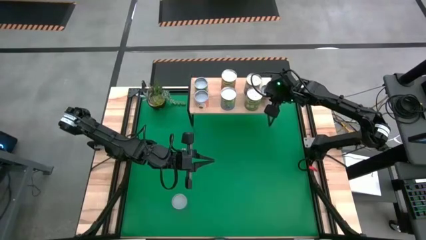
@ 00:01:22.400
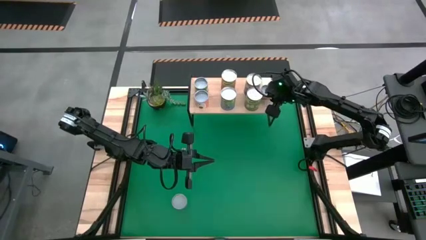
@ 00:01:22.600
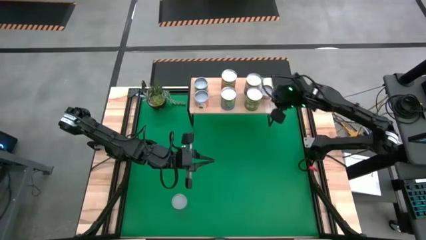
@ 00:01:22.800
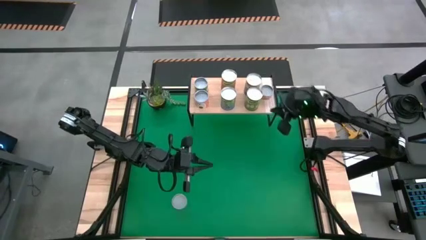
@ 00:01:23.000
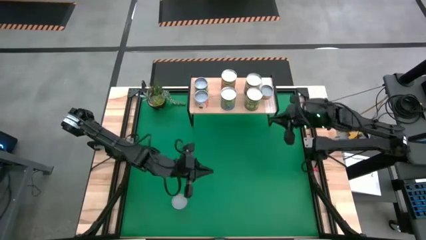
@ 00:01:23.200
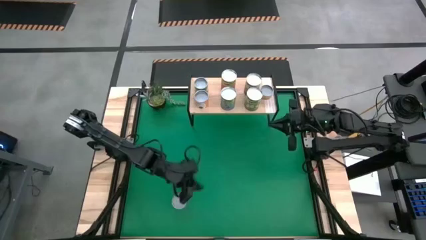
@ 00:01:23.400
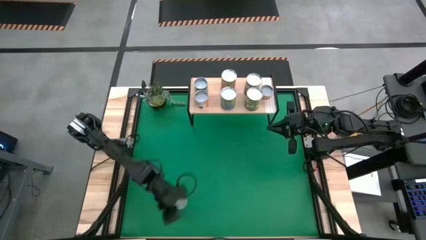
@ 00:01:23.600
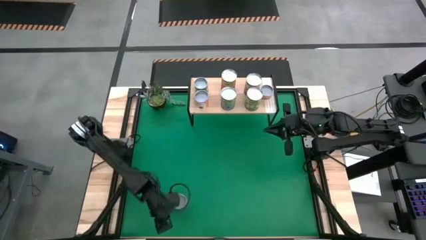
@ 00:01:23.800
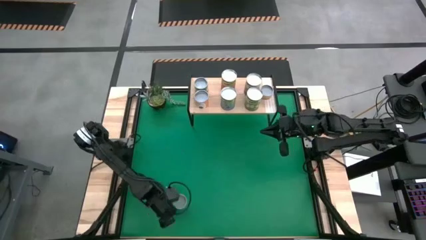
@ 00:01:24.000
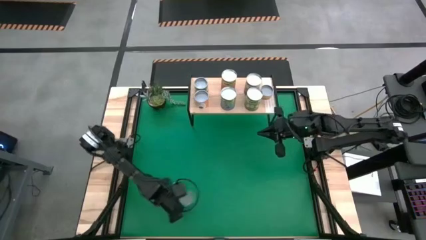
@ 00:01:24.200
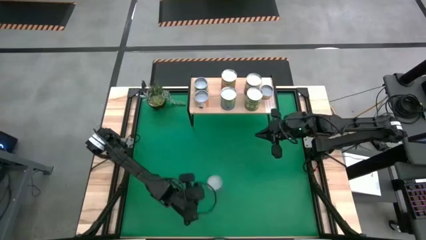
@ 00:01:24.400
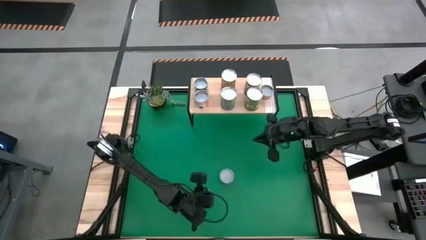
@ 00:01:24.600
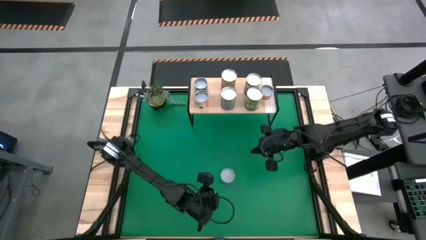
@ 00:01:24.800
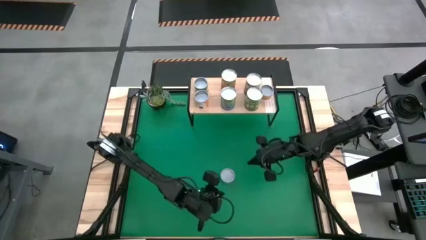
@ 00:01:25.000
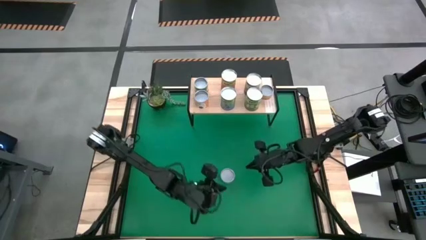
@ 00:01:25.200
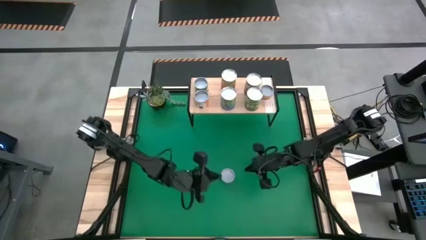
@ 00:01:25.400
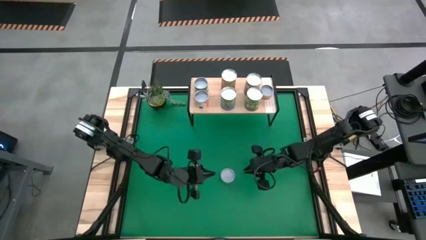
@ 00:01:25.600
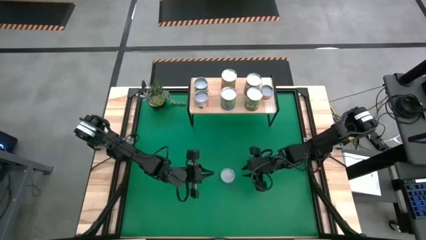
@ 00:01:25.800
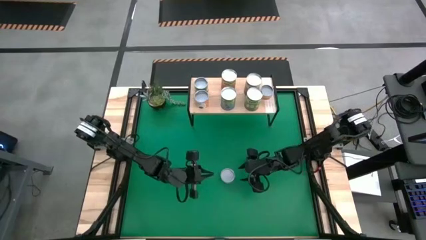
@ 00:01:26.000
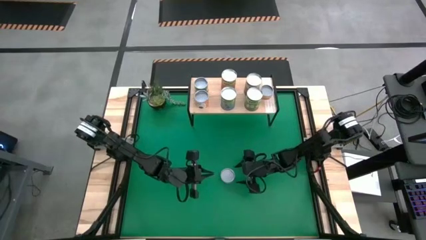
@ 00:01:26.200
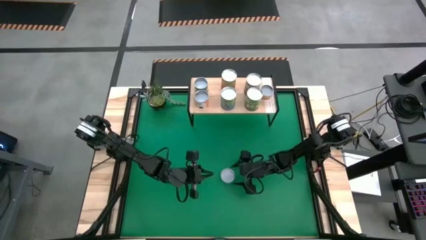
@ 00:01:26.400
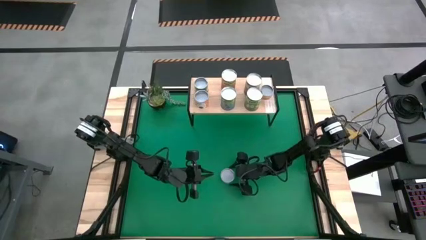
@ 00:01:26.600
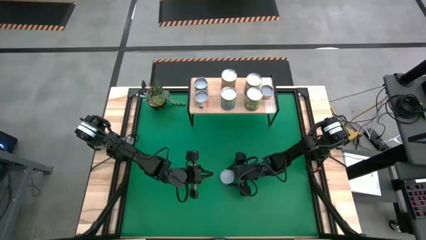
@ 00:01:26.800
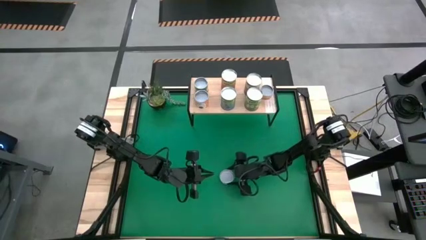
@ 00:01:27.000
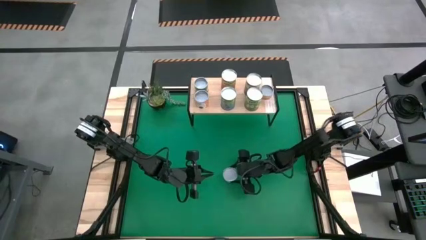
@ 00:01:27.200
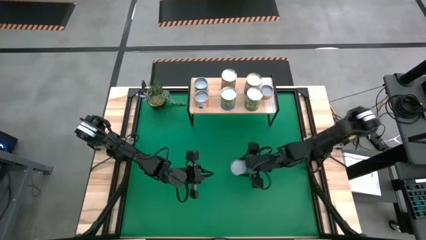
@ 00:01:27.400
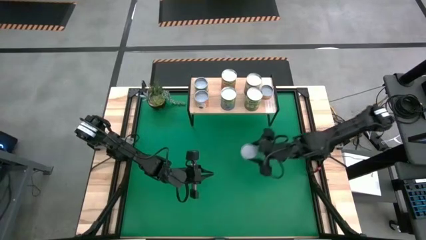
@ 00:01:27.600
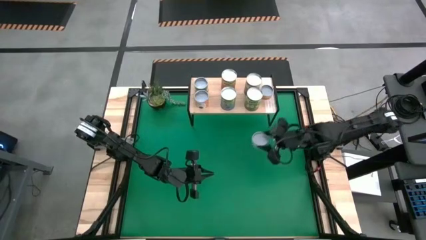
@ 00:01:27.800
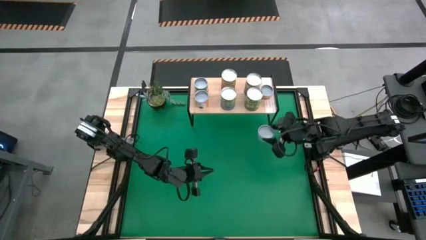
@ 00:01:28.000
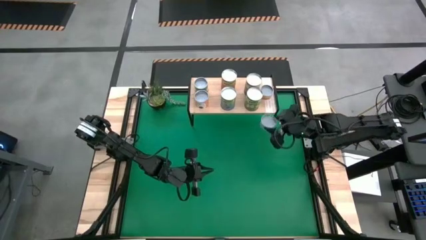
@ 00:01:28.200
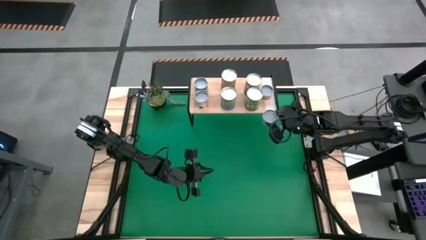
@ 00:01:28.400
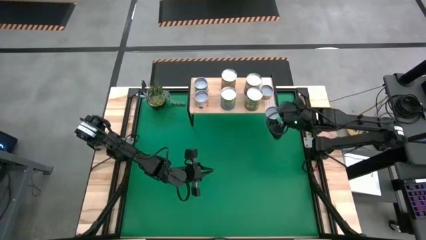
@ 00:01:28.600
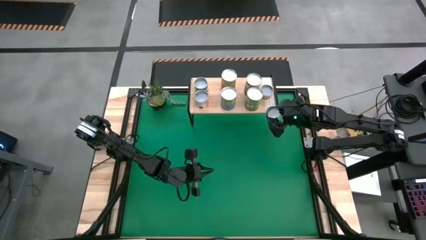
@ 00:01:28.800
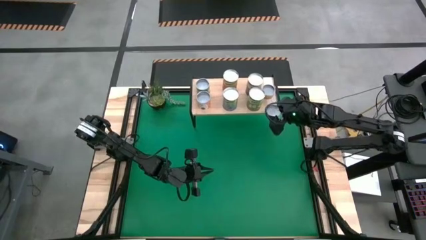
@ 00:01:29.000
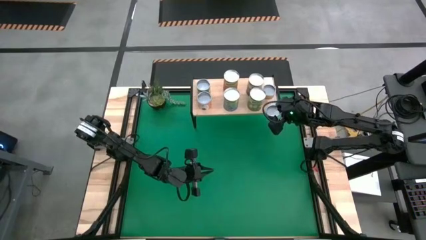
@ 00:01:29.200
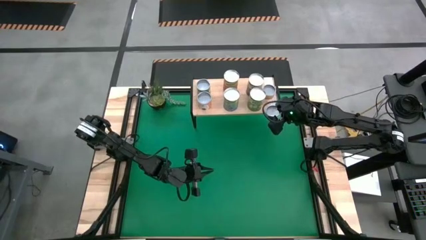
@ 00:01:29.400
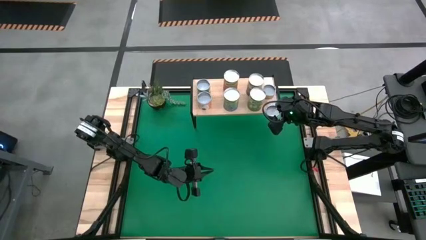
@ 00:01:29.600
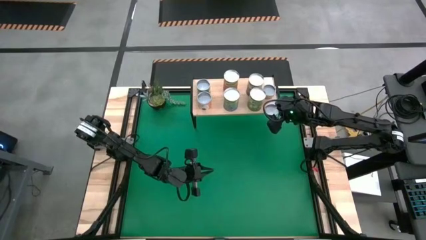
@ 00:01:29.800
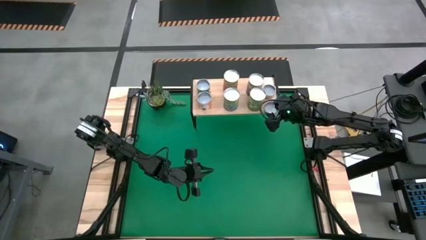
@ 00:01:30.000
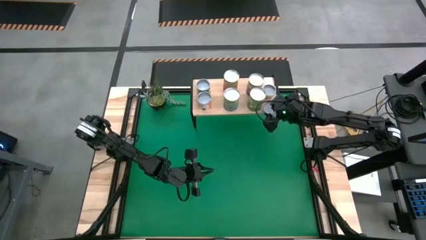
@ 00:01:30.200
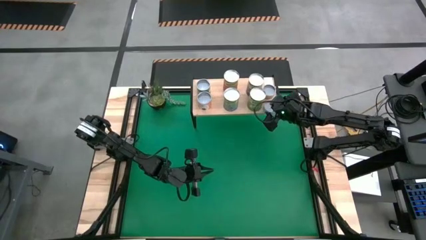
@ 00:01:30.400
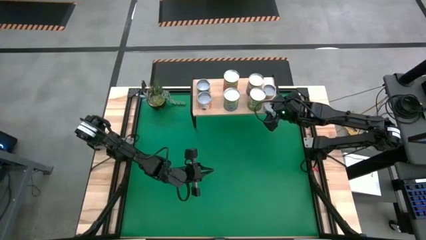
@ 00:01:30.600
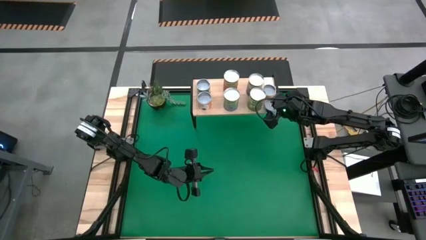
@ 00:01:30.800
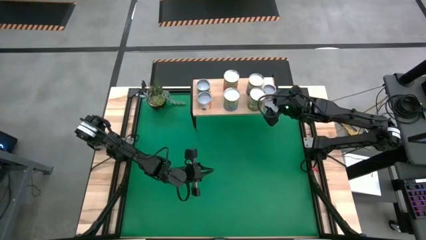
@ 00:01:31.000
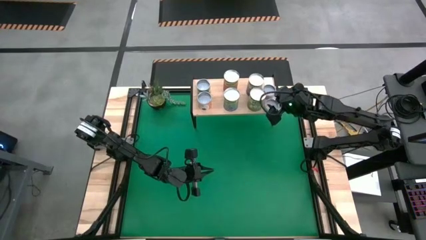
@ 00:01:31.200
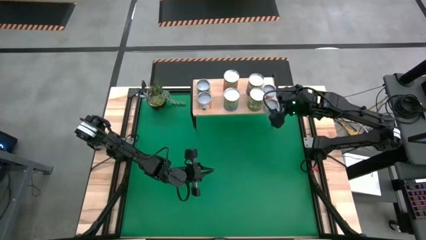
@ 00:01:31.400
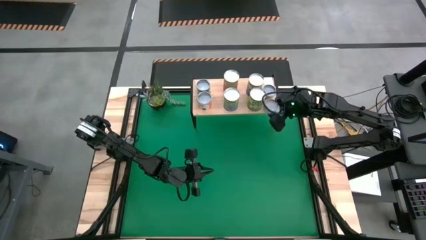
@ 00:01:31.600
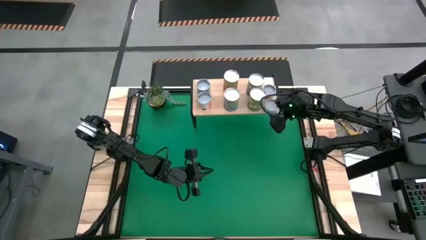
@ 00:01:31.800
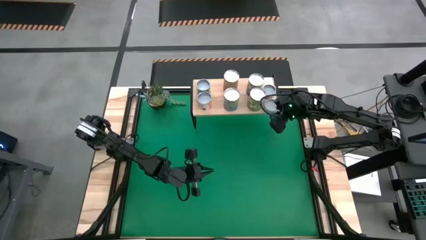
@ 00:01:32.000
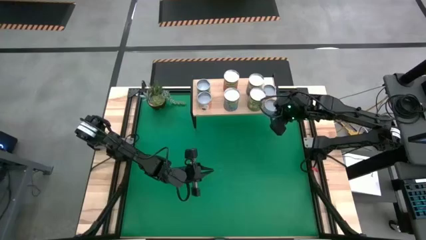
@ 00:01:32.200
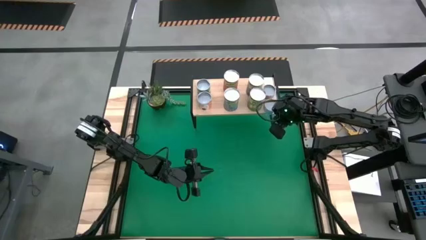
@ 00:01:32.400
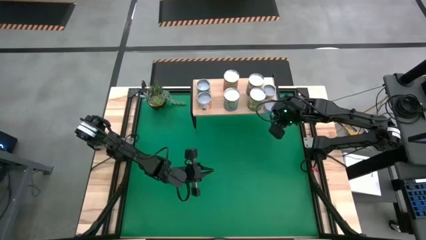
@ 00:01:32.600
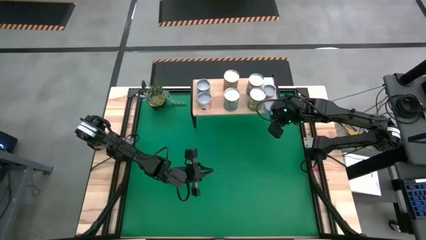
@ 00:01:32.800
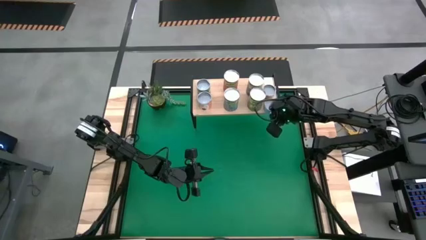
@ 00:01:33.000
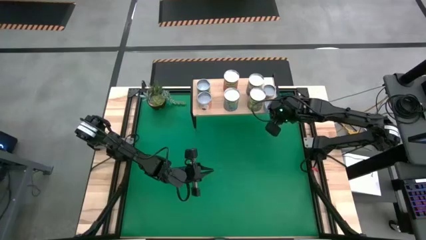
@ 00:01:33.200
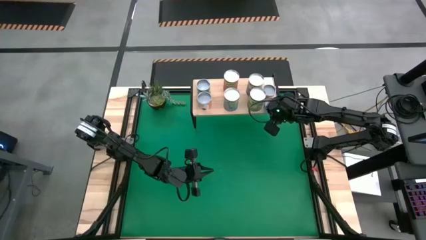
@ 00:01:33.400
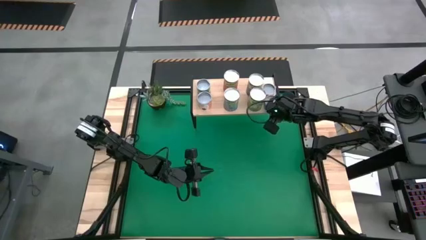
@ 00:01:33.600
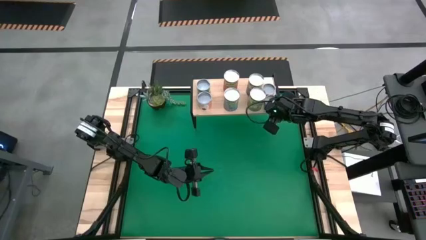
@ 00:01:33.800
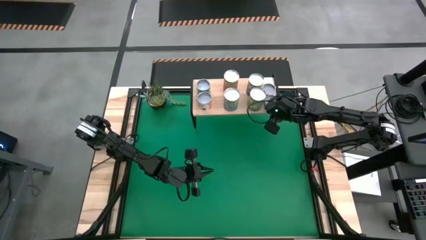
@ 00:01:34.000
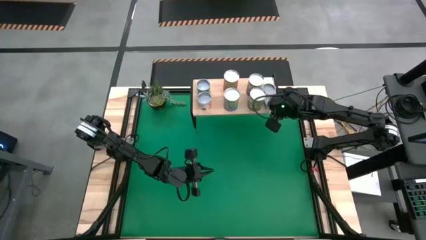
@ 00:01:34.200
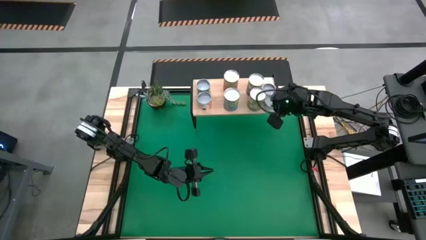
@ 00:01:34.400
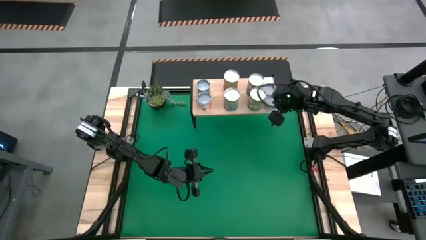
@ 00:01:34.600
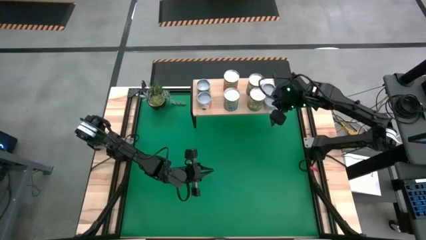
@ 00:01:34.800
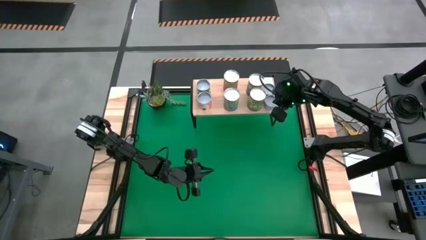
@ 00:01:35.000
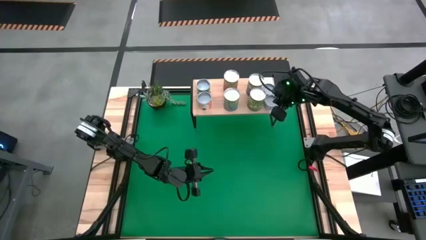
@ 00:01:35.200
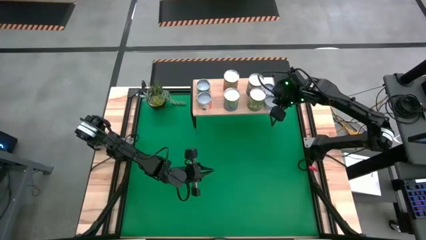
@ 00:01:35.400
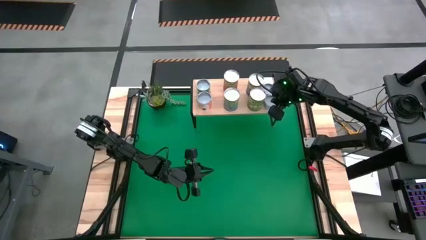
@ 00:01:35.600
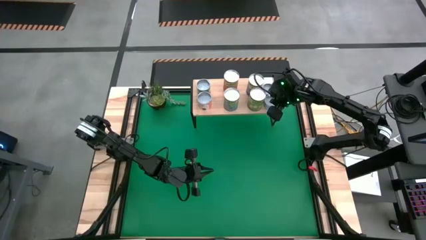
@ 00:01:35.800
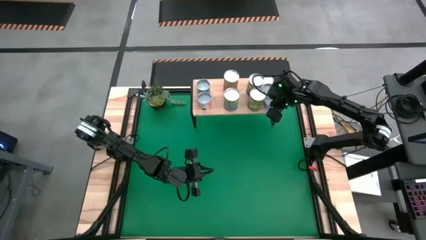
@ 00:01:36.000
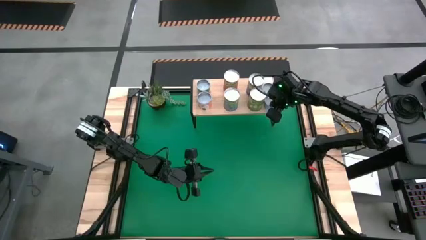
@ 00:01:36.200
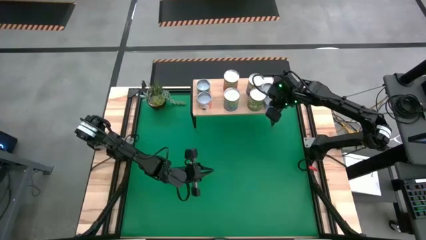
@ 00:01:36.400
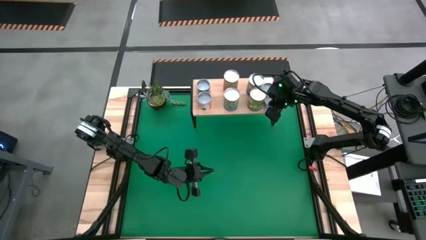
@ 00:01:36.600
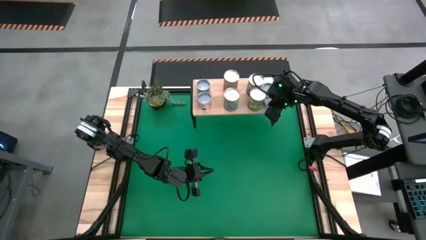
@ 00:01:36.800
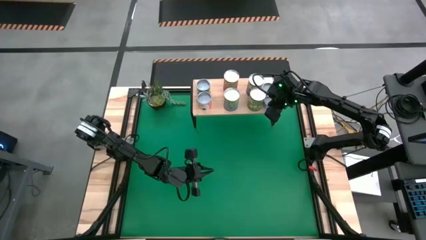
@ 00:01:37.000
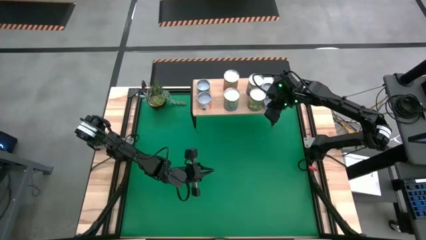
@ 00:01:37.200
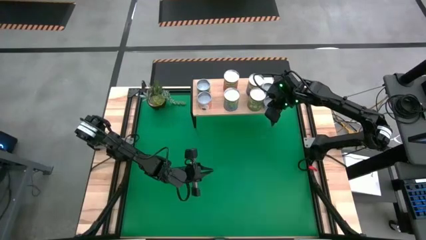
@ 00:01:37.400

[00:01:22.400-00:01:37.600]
Task: Pick and place cans onto a shelf
Put the blue tuna can on the shelf

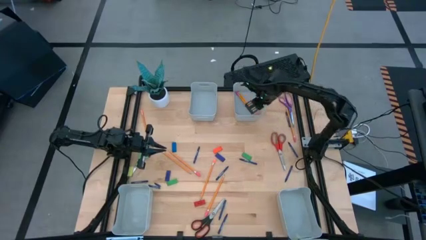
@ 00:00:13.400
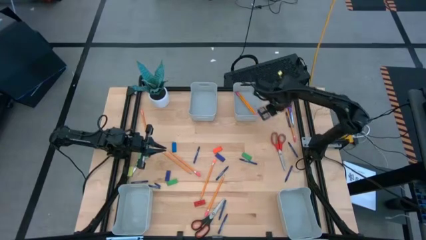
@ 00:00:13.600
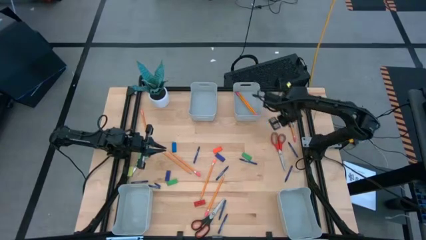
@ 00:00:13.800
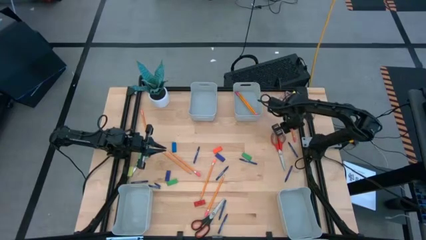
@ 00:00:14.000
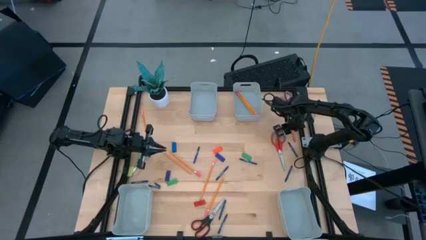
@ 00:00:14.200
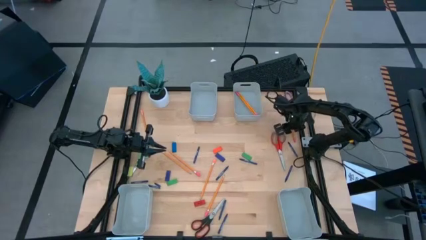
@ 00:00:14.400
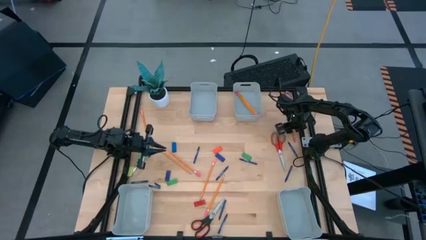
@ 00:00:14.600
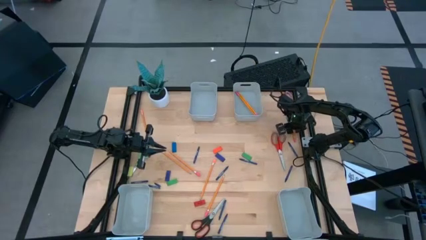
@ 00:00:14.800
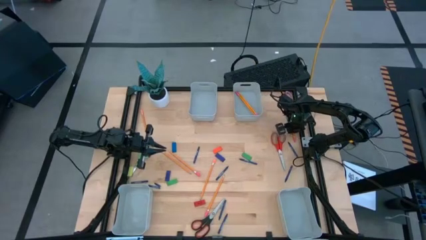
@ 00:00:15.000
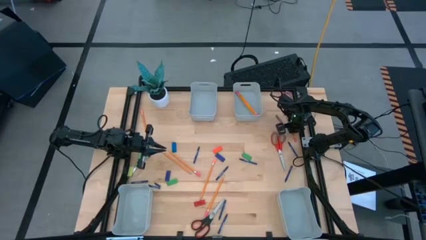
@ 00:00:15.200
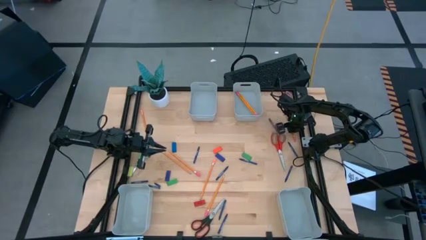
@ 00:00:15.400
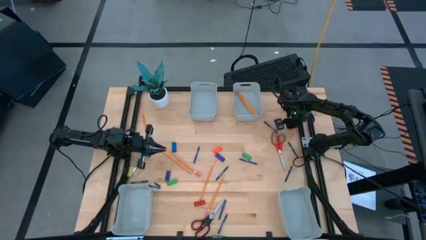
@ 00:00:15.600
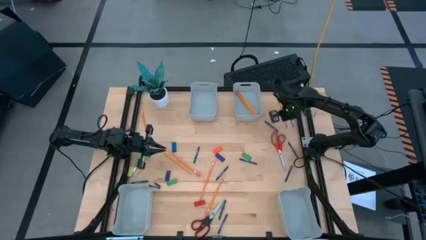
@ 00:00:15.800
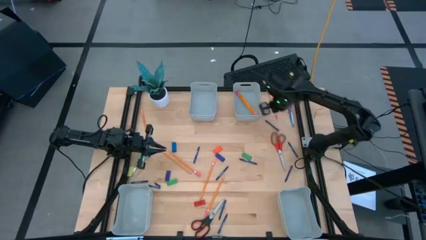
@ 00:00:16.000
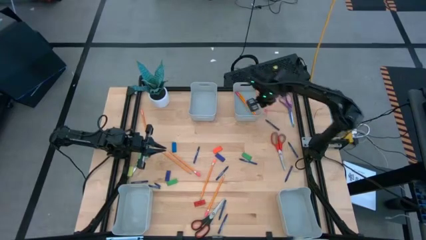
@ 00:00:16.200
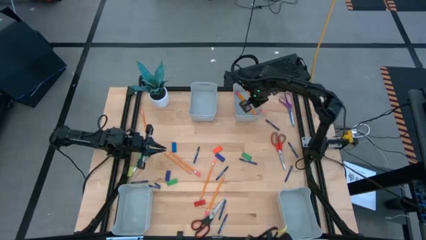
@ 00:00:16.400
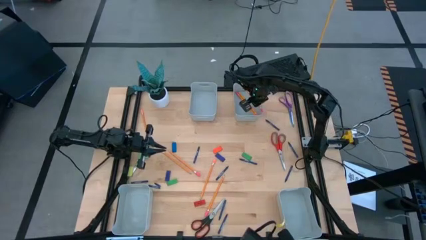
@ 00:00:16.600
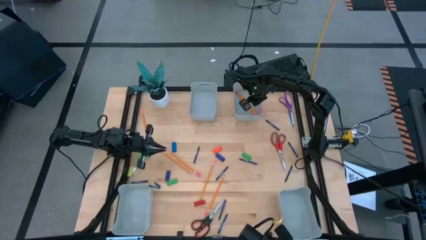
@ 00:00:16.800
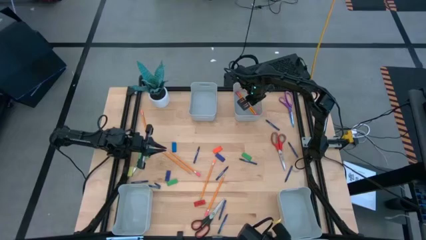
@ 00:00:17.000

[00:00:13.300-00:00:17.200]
Task: Sort crayons/erasers/pens/pencils in bins
Put the yellow pencil into the top right bin
